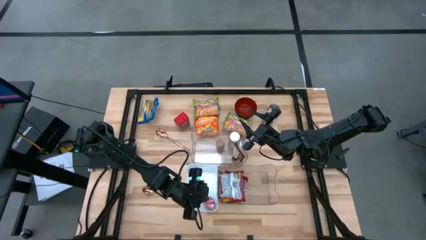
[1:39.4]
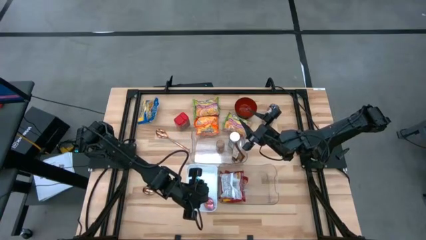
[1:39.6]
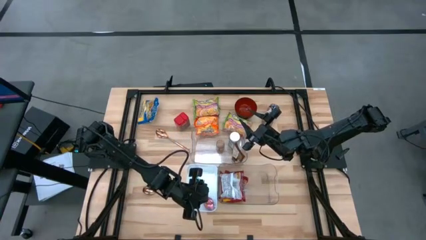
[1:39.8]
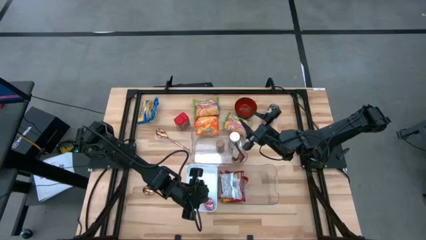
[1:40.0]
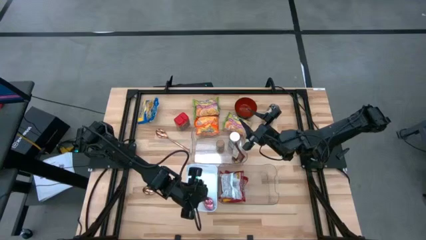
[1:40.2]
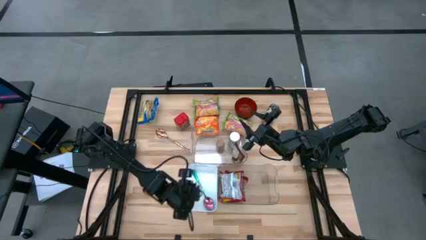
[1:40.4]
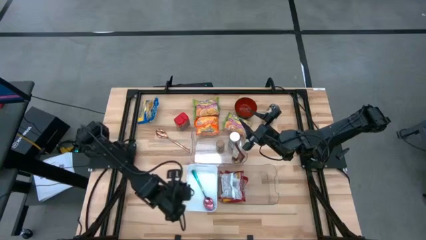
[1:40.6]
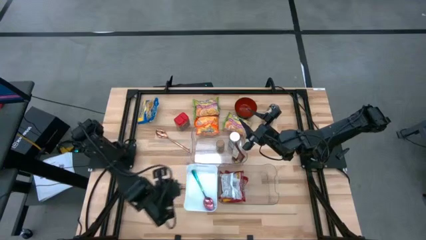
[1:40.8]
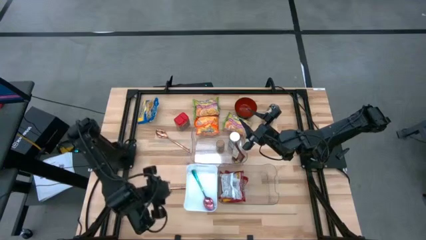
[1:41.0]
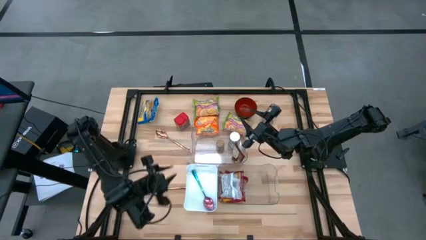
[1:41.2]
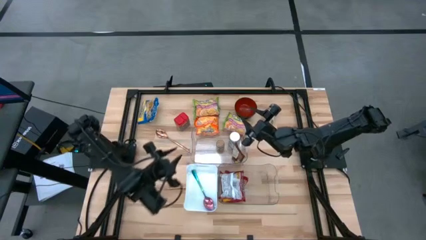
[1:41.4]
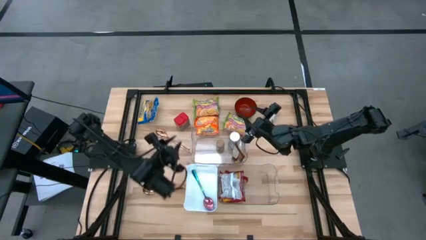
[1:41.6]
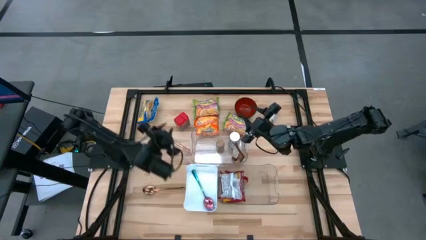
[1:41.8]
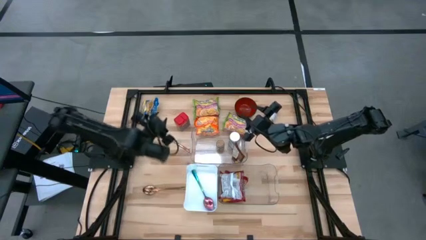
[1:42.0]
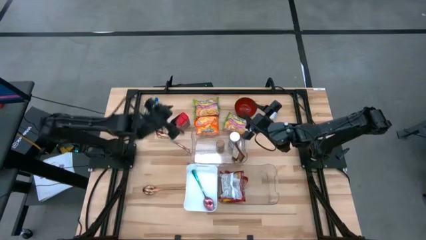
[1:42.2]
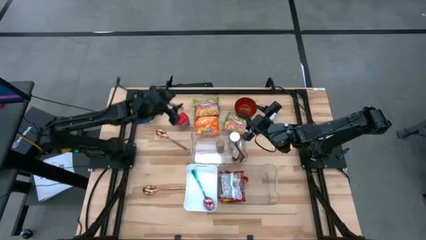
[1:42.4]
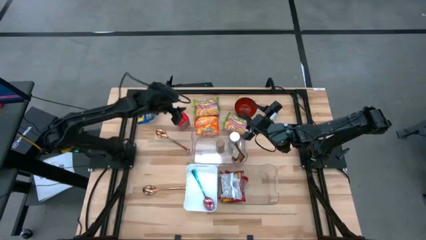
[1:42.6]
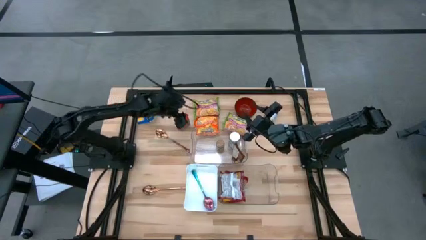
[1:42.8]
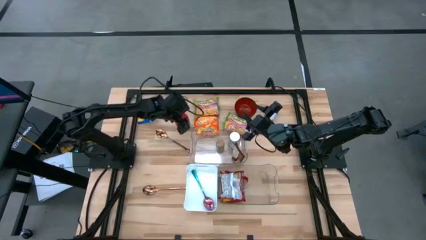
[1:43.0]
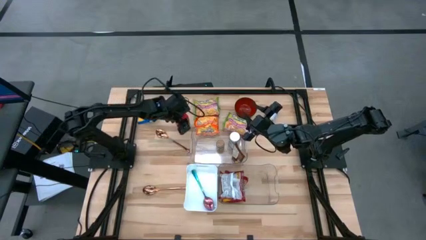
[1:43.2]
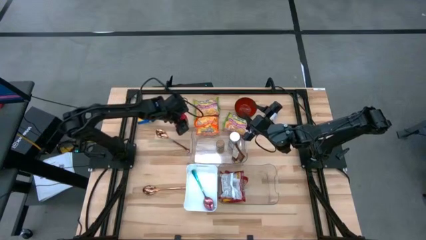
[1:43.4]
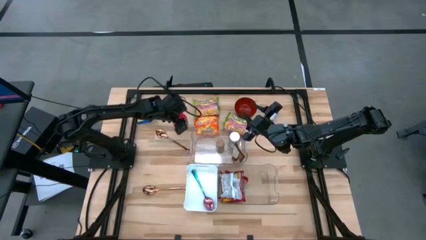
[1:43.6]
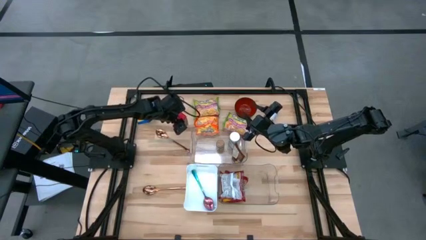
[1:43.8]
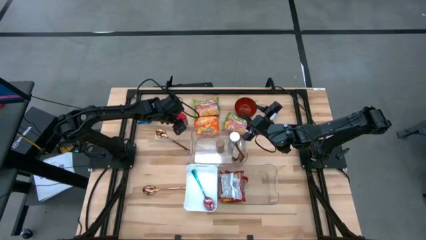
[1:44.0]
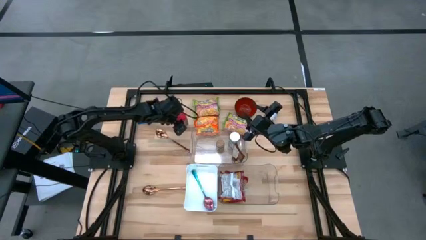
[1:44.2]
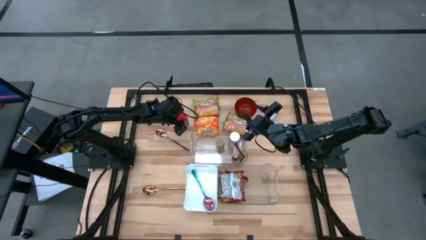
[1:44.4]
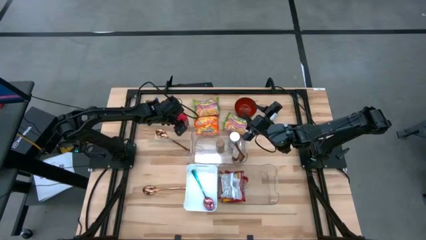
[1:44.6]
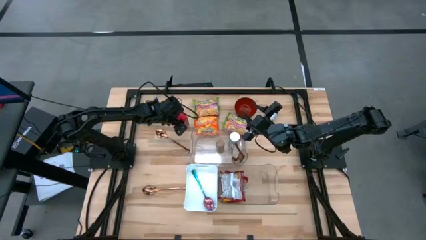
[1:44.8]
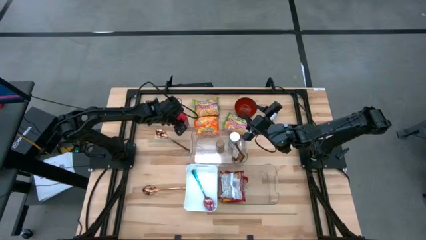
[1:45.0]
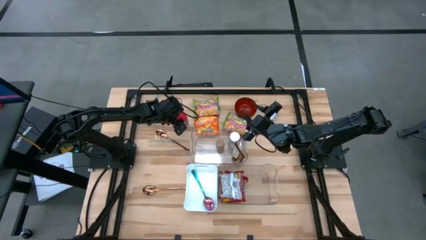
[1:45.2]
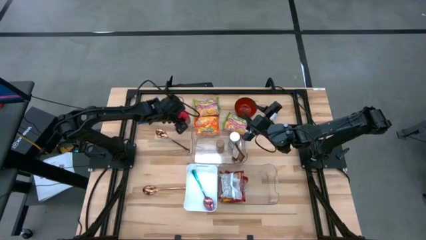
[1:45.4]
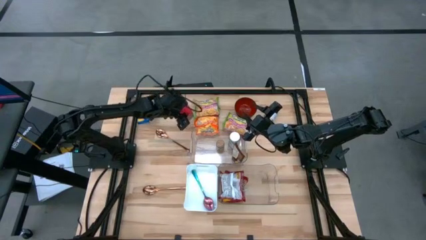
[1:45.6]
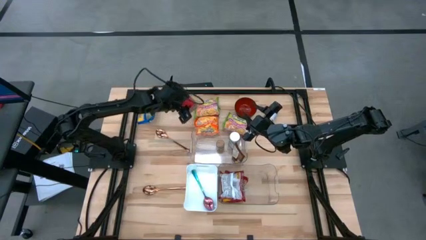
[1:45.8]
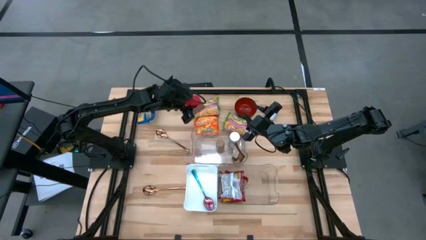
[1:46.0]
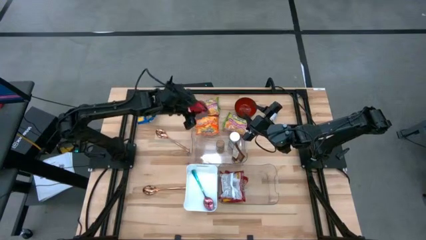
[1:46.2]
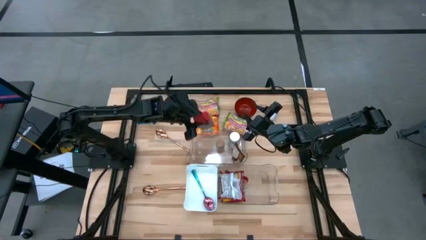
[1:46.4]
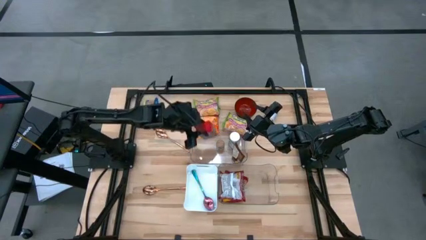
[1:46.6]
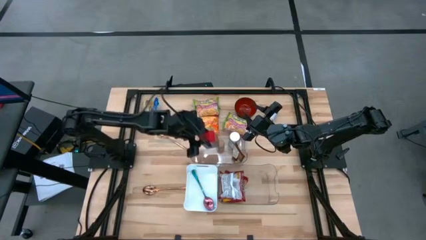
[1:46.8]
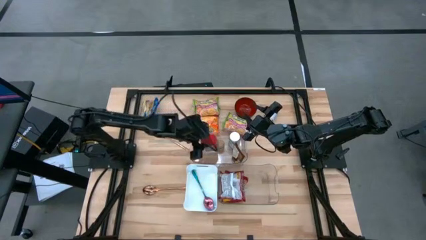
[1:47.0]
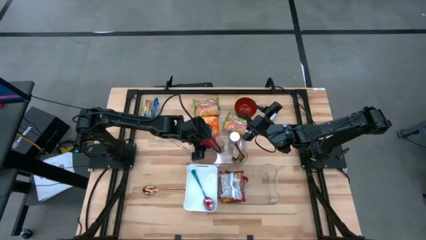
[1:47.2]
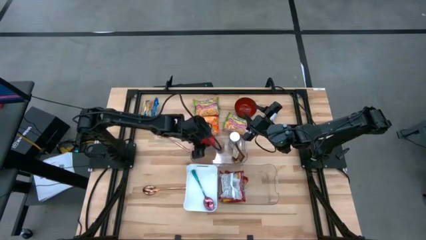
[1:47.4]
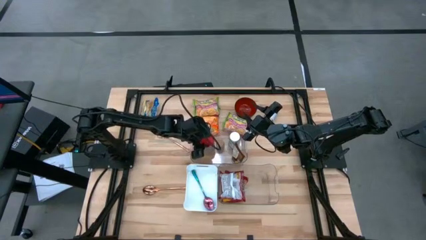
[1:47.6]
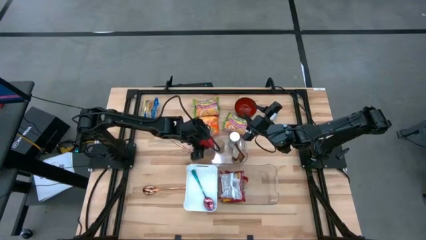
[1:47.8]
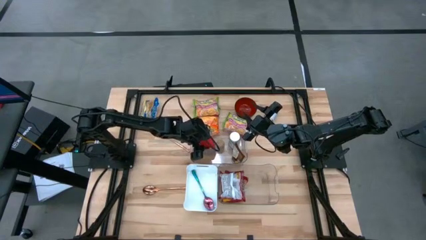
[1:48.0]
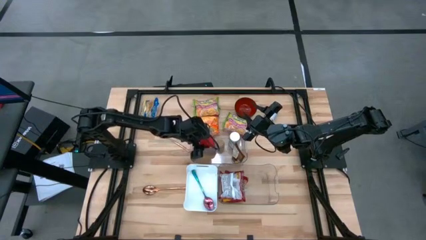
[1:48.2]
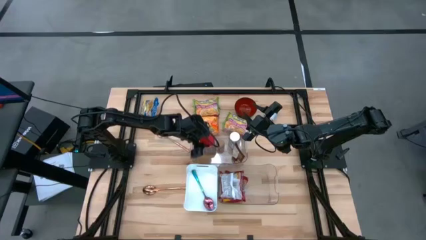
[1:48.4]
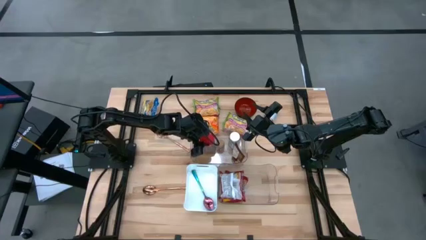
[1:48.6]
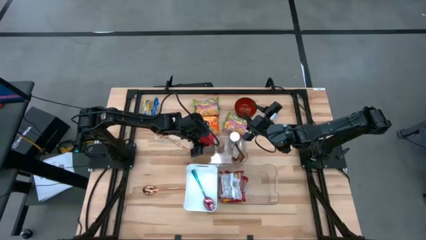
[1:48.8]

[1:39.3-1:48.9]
Task: Pick & Place Food Item
Put the red spice can into the top transparent bin
